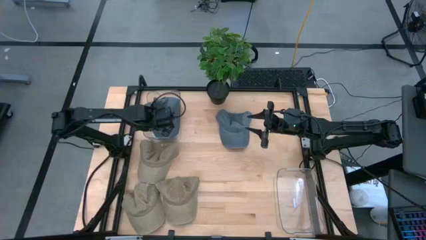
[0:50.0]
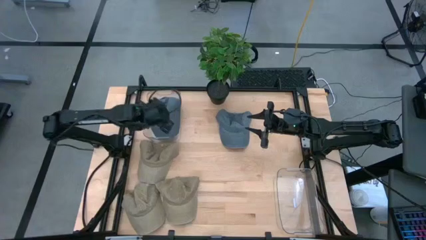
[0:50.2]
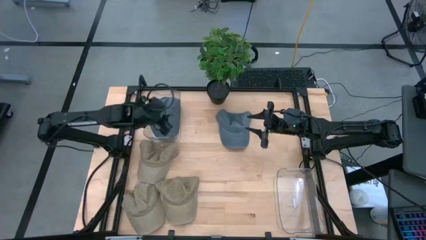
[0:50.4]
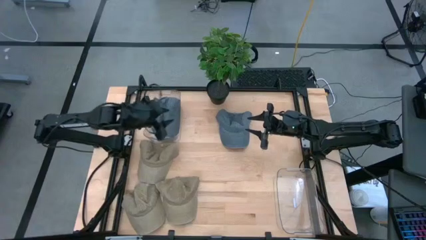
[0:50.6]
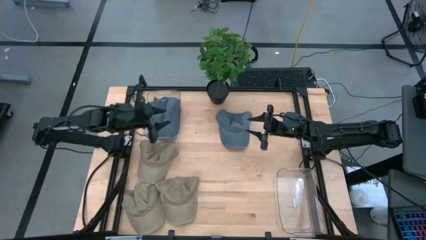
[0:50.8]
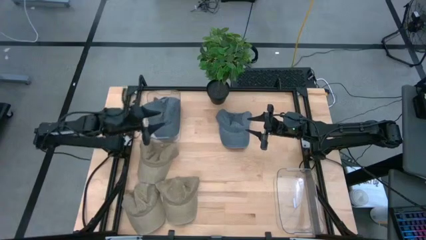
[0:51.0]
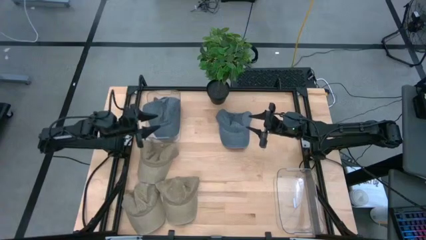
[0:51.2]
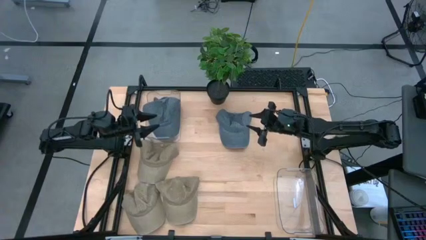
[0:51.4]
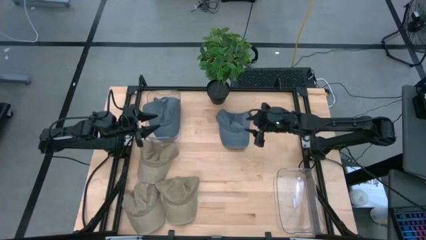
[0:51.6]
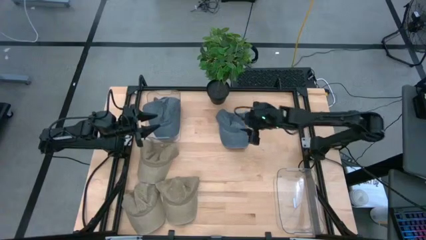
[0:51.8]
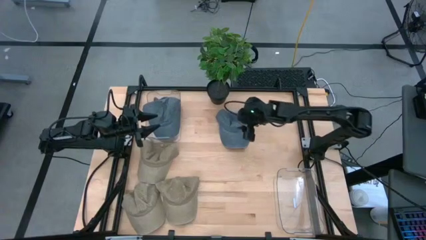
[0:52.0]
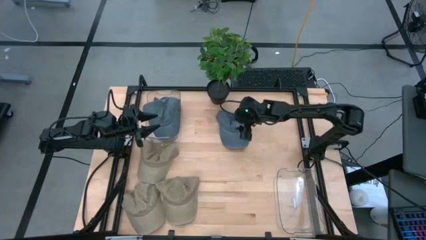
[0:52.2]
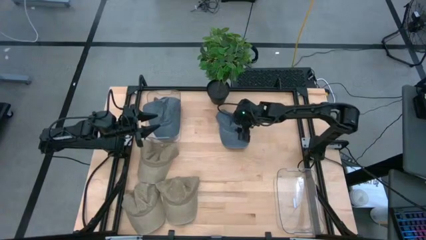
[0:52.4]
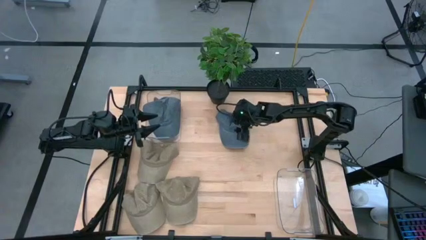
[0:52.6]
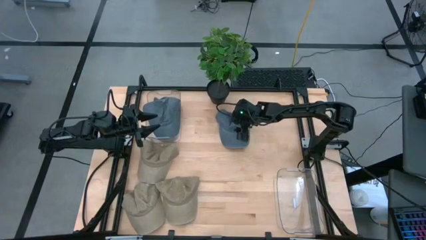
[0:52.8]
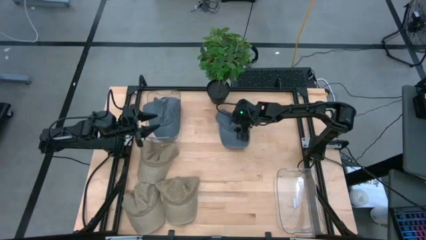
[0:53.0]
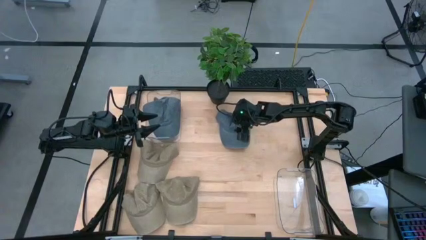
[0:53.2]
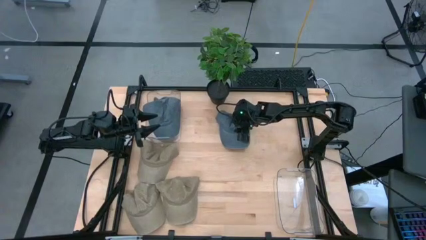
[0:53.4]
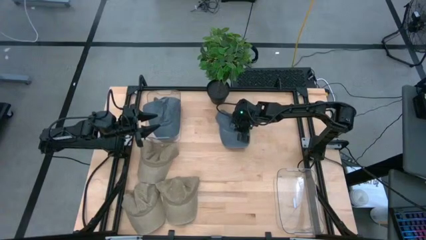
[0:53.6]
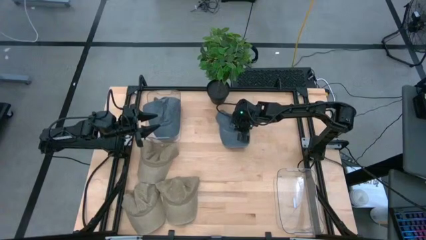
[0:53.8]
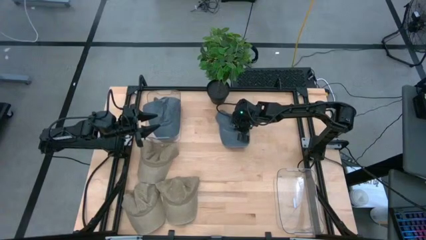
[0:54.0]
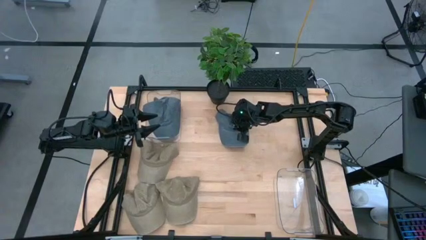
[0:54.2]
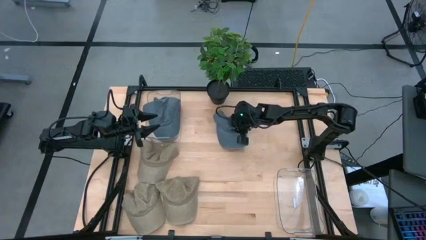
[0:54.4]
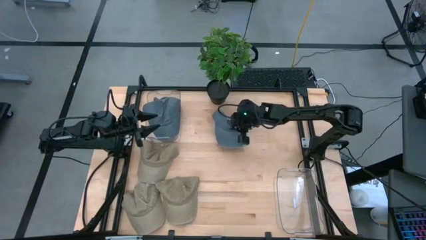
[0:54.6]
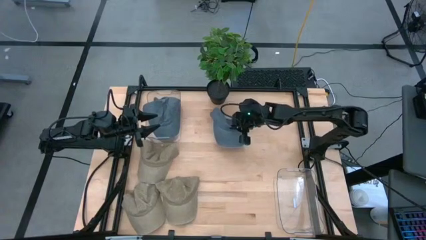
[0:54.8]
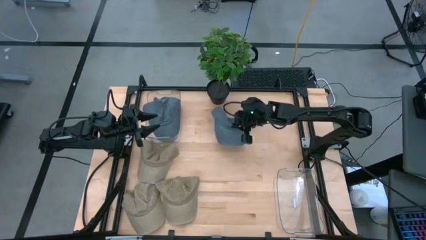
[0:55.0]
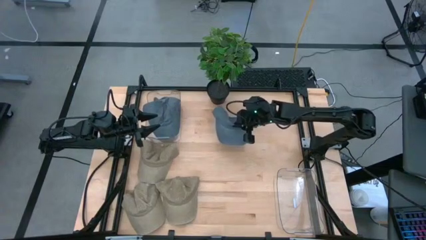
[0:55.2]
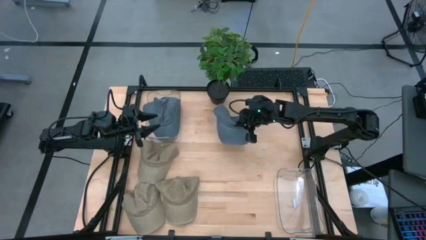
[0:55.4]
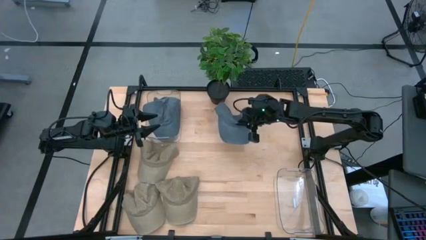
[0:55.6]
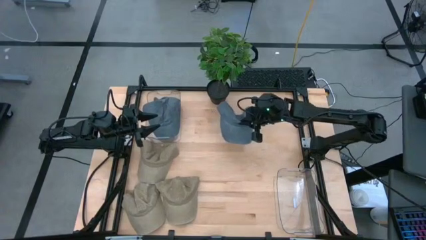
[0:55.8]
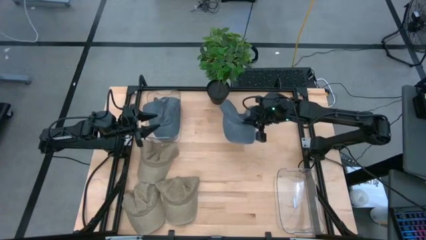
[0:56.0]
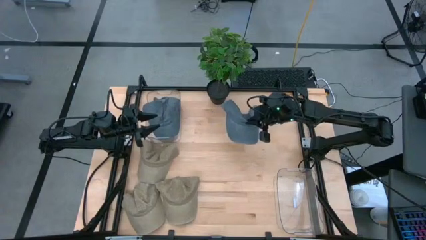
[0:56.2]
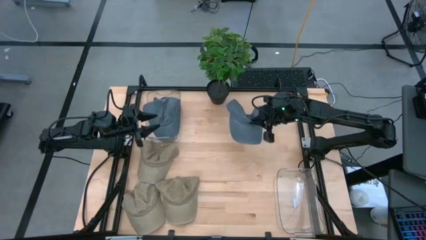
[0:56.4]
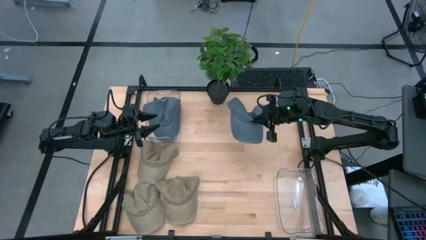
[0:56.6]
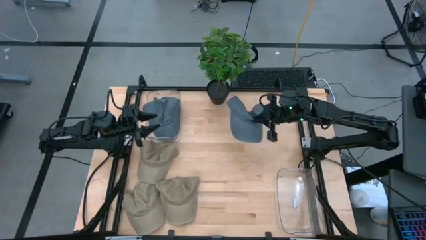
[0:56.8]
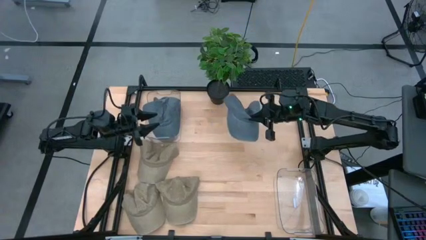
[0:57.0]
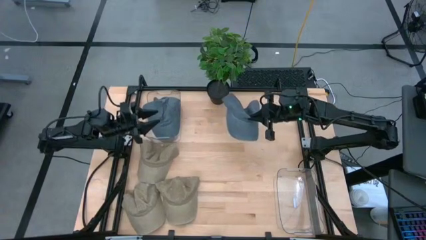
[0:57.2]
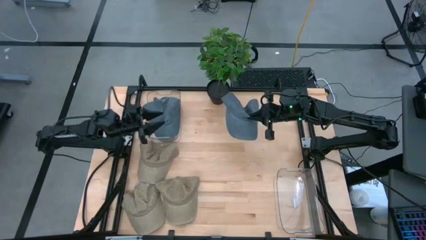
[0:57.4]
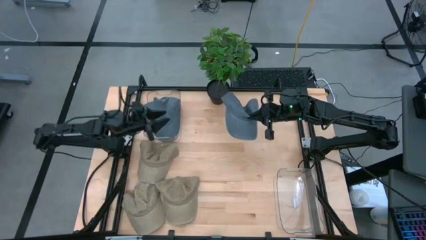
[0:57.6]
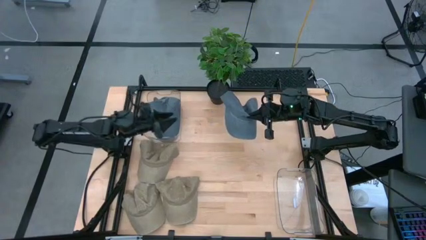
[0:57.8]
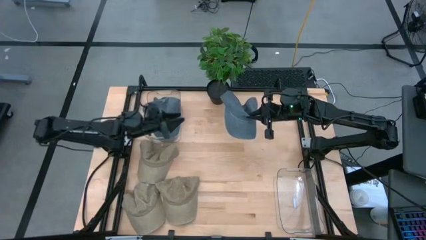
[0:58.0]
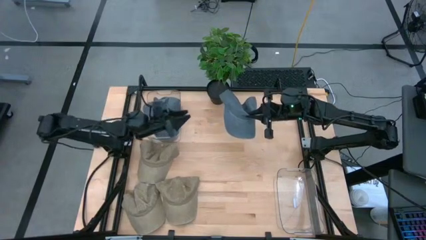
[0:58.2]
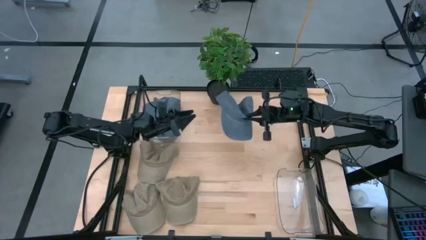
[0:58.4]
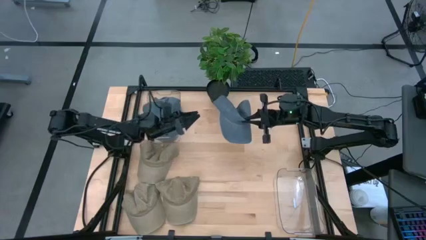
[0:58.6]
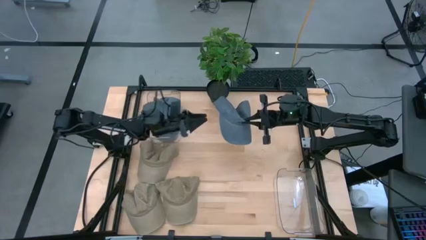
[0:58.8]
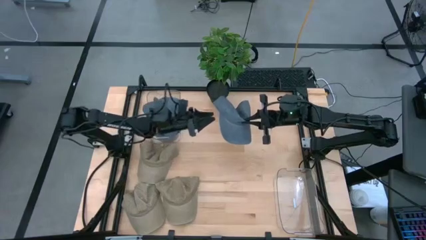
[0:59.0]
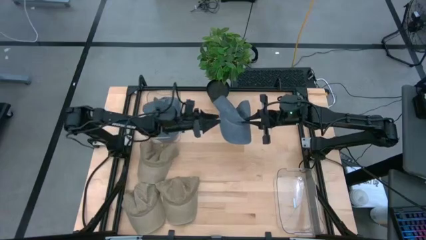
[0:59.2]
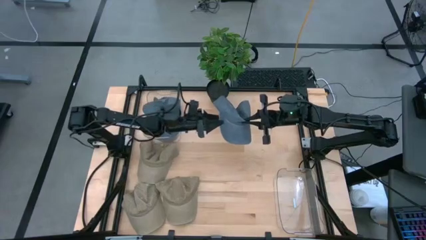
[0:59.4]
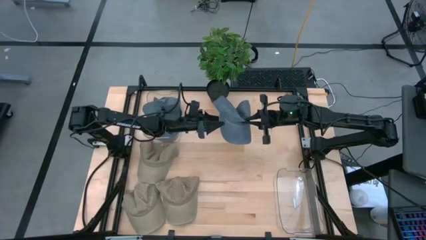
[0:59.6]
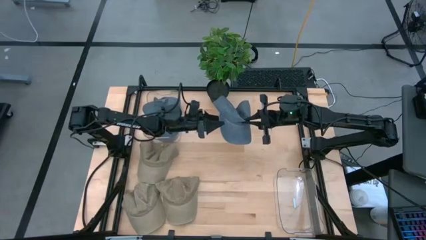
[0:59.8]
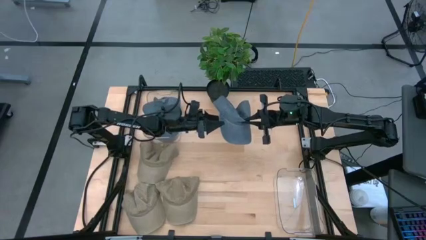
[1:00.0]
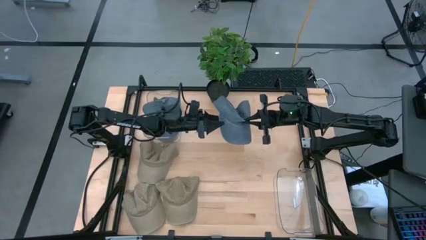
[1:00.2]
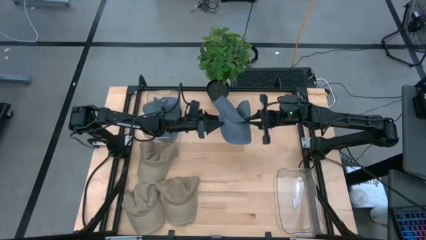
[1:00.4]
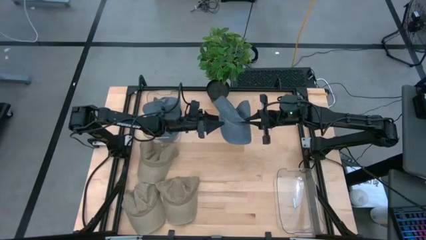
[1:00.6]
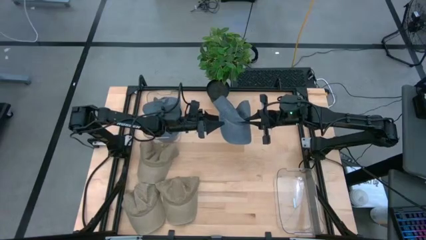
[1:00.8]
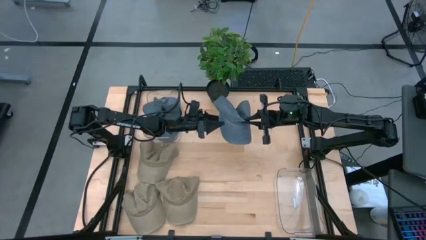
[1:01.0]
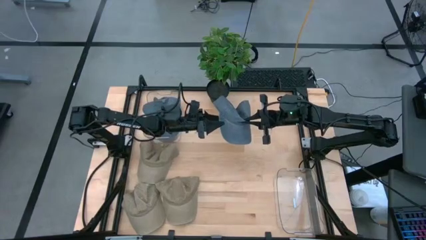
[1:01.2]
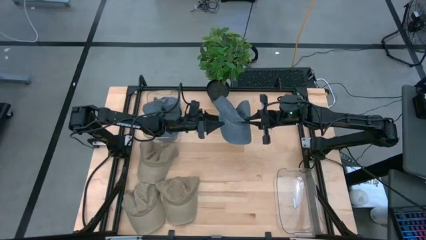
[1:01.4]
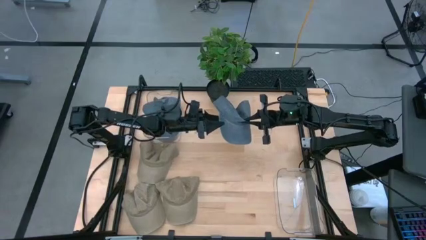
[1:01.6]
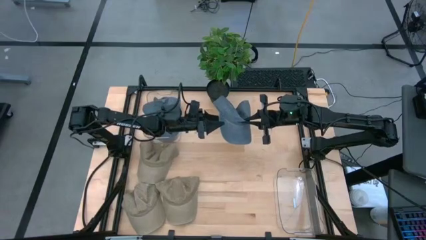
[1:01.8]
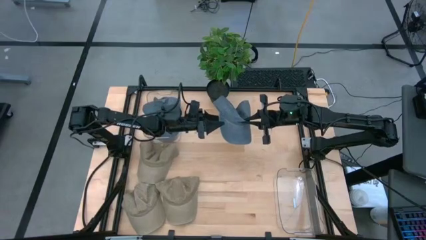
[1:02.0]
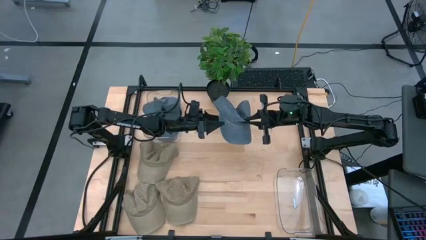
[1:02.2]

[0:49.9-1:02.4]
Task: Pick & Place hat
Put the blue cap into the left transparent bin

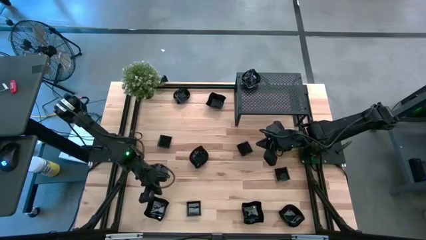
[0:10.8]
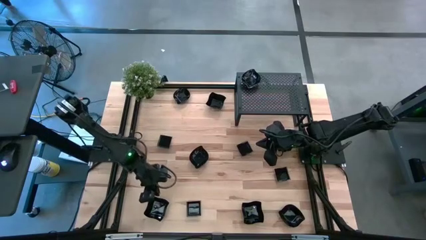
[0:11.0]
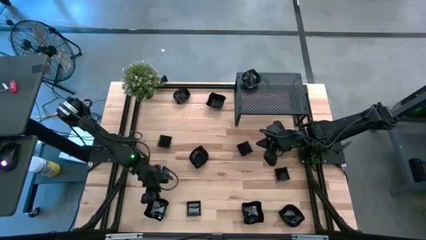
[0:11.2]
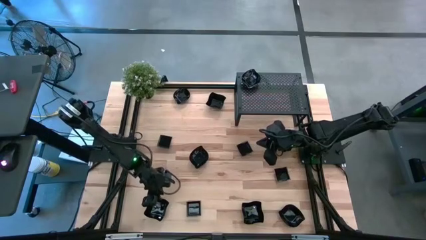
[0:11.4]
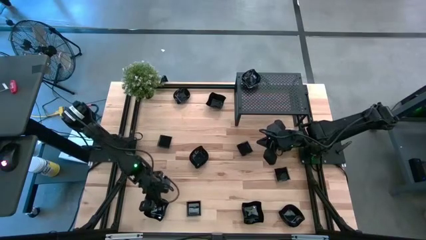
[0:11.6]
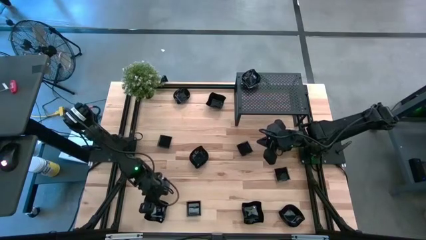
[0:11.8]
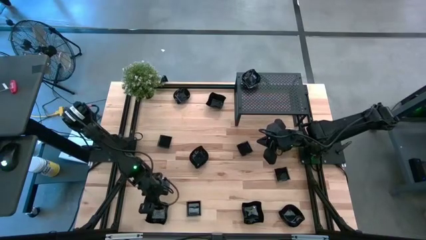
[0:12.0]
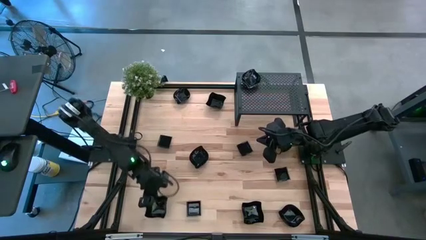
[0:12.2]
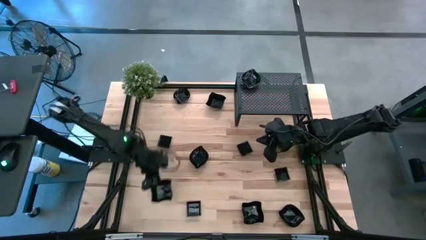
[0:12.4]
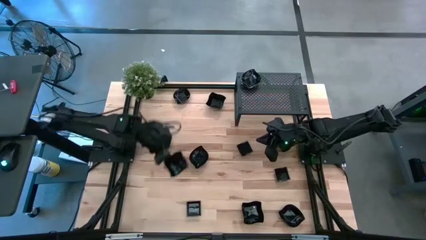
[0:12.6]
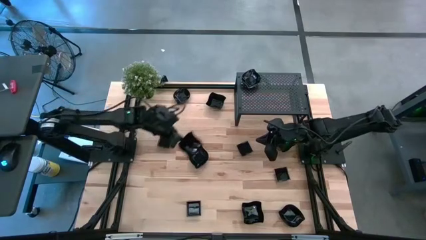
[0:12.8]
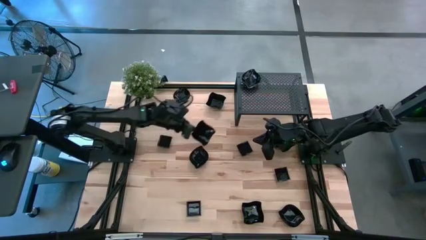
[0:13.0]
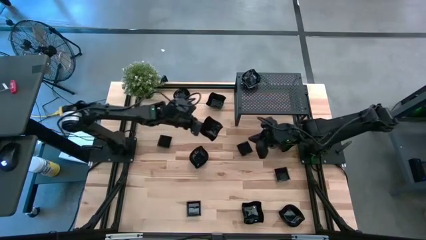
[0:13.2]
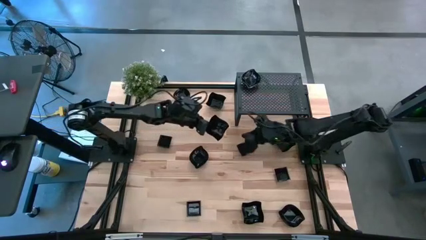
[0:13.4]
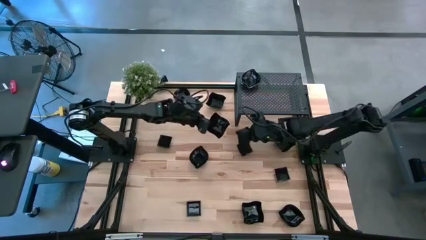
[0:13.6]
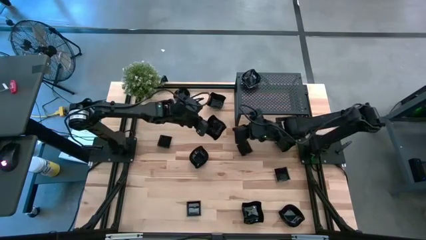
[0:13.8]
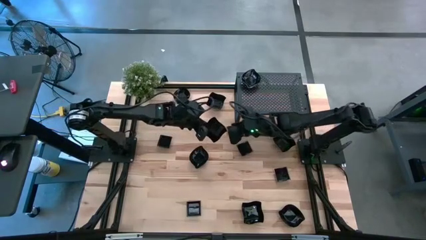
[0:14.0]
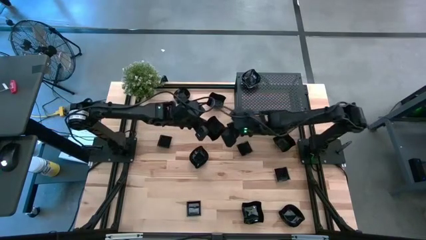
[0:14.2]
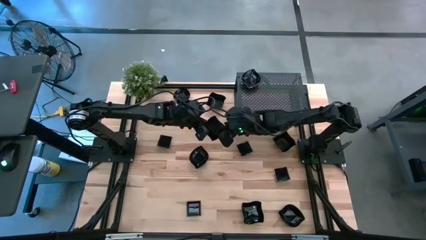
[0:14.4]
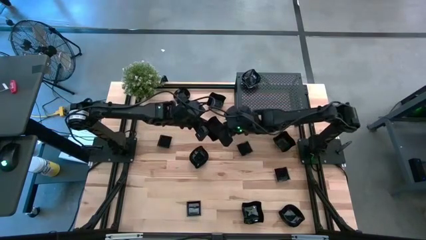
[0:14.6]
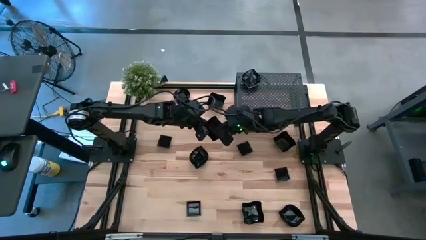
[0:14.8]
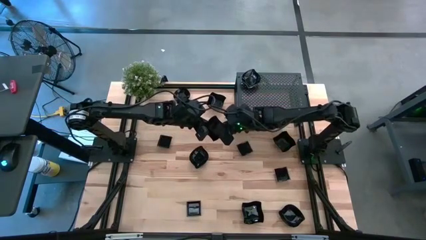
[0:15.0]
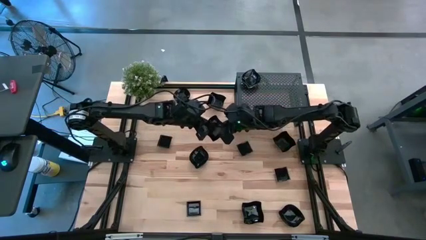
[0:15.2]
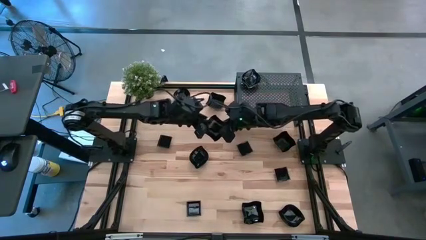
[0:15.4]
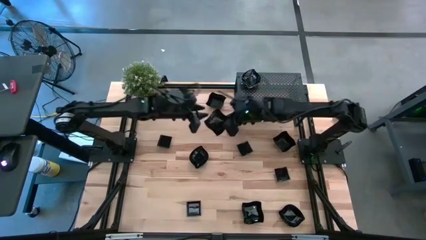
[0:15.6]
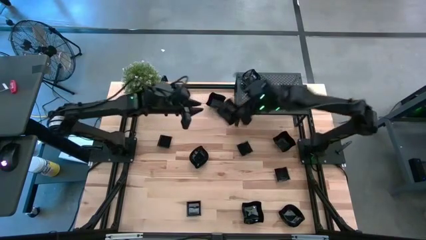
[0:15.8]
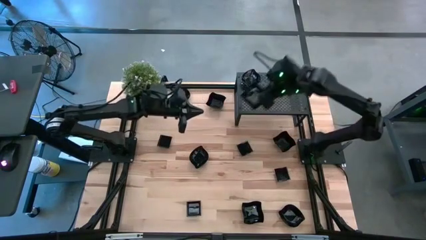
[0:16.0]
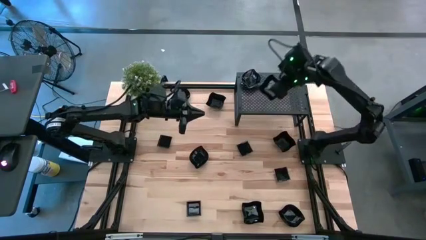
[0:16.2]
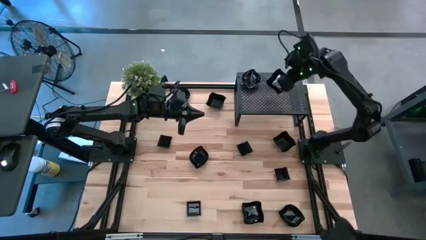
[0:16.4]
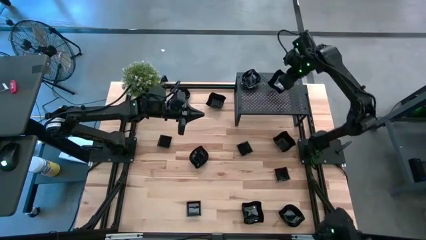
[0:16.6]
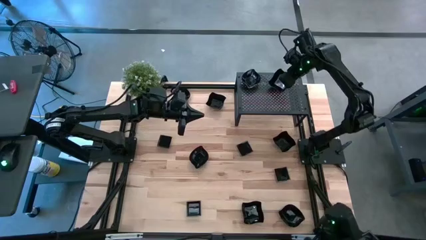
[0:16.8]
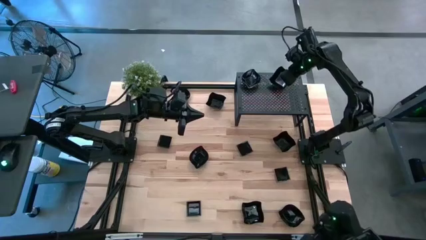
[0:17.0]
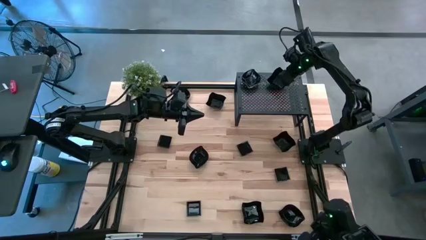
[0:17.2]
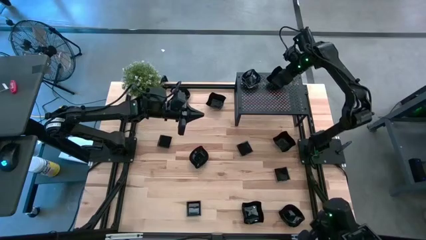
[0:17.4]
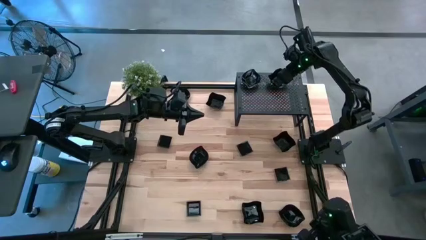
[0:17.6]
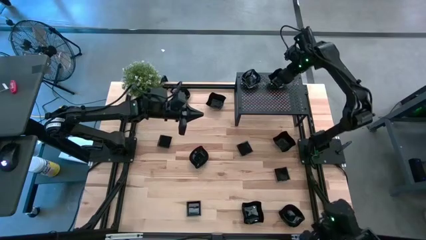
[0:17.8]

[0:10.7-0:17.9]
Task: Pick & Place Mini shaped plates
Put the black distorted square plate on the shelf
